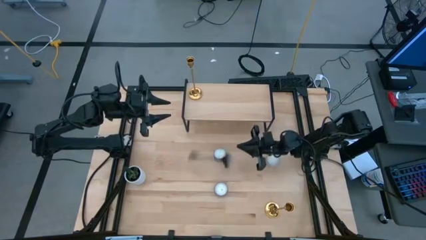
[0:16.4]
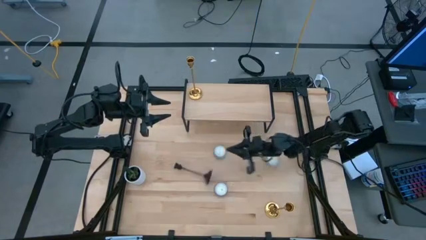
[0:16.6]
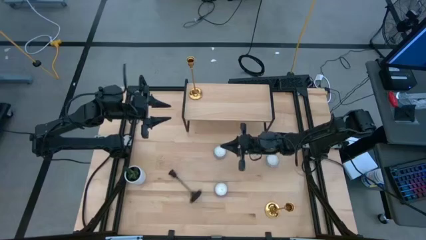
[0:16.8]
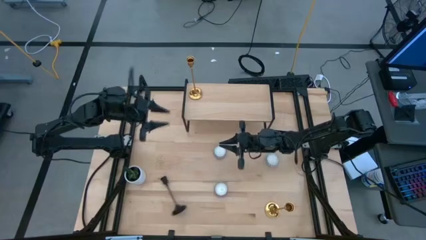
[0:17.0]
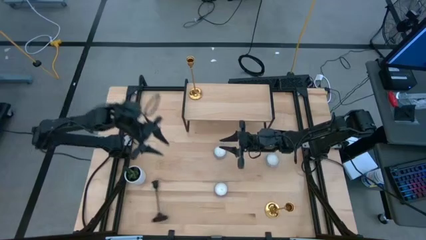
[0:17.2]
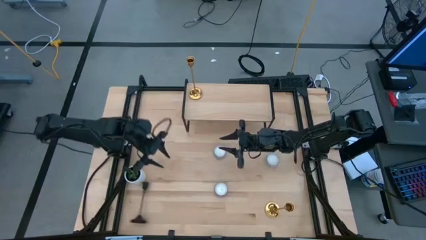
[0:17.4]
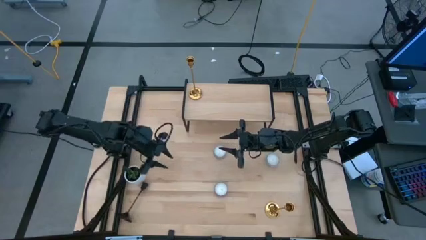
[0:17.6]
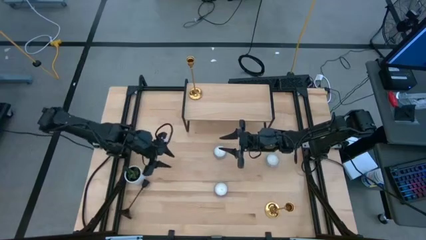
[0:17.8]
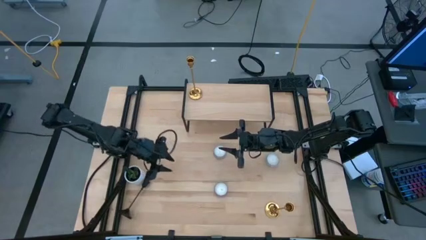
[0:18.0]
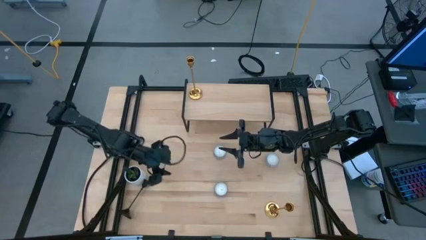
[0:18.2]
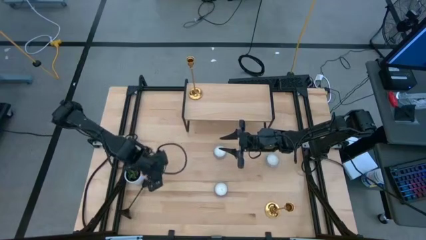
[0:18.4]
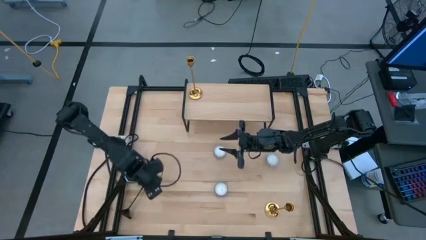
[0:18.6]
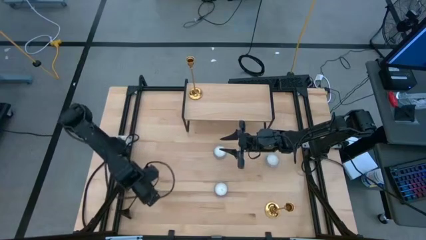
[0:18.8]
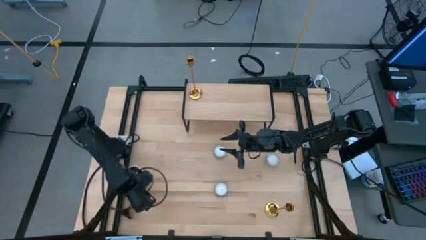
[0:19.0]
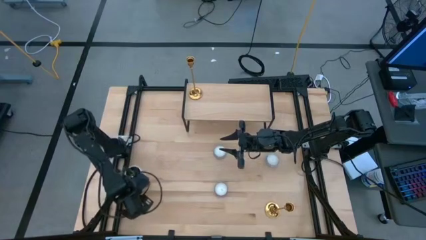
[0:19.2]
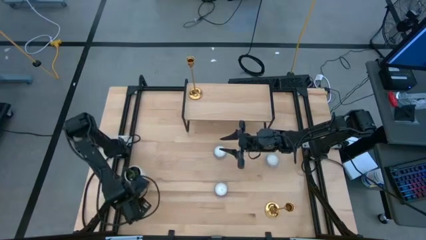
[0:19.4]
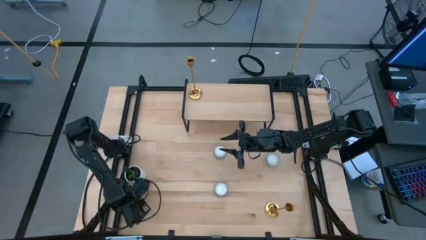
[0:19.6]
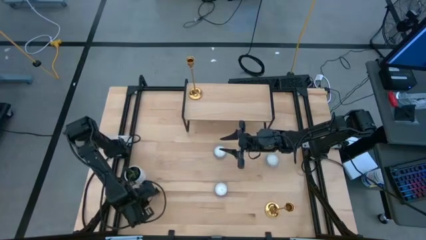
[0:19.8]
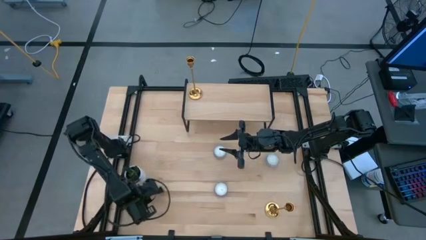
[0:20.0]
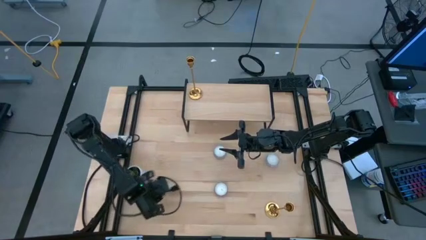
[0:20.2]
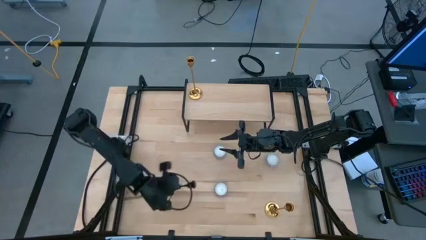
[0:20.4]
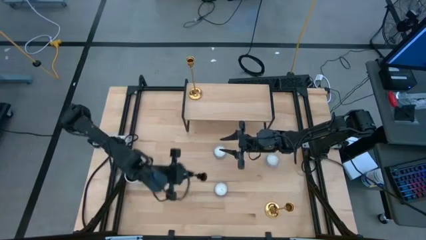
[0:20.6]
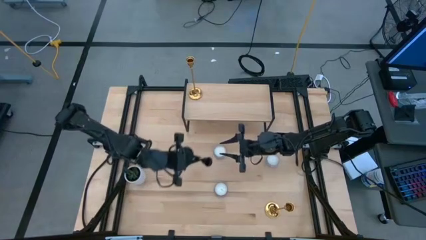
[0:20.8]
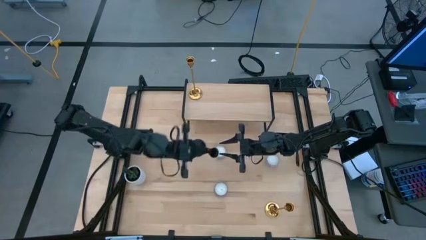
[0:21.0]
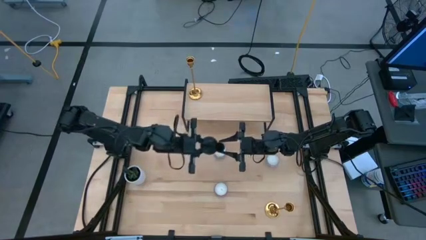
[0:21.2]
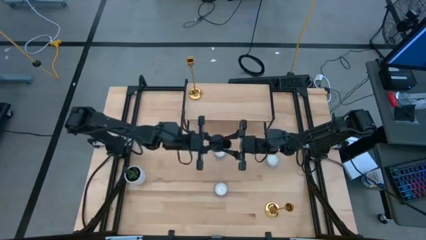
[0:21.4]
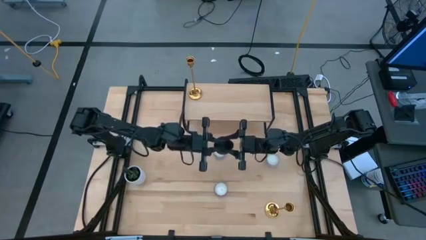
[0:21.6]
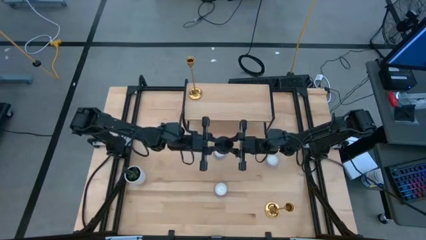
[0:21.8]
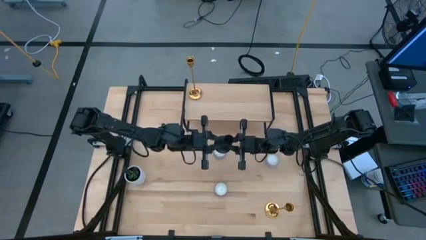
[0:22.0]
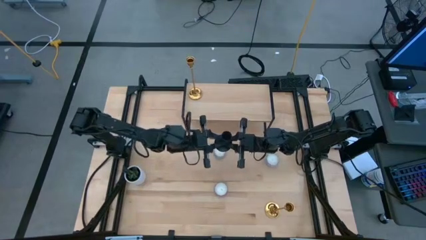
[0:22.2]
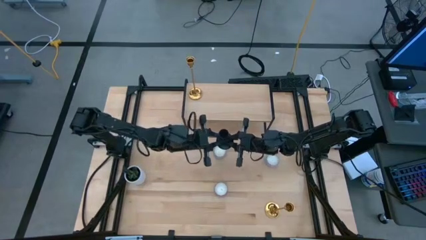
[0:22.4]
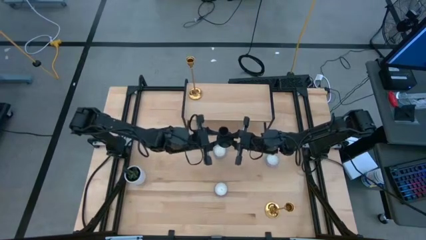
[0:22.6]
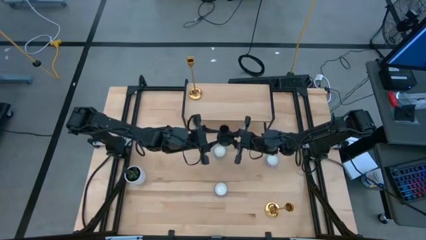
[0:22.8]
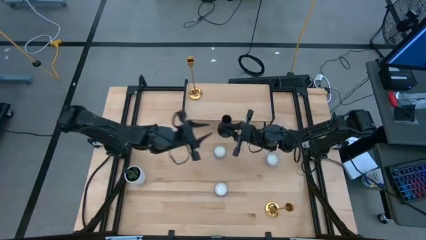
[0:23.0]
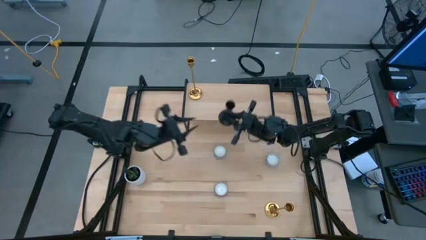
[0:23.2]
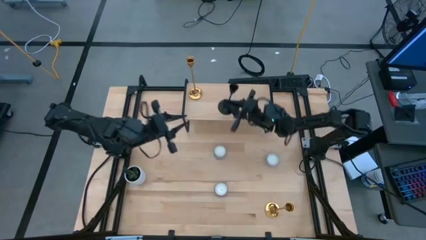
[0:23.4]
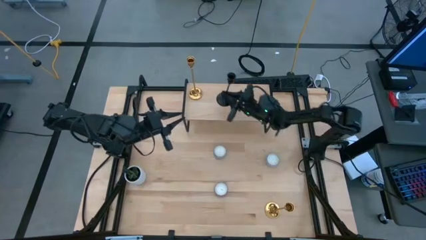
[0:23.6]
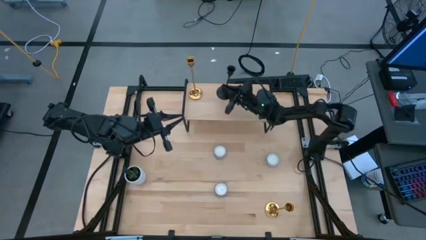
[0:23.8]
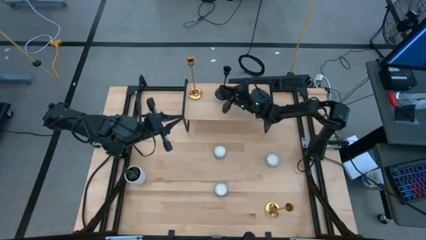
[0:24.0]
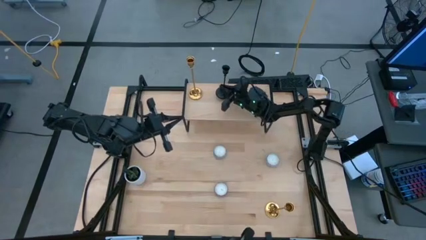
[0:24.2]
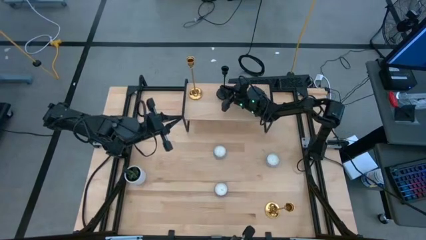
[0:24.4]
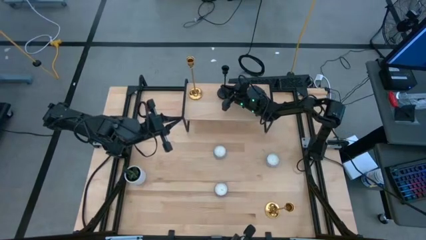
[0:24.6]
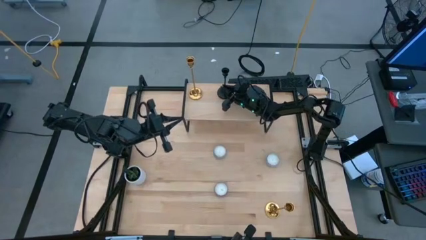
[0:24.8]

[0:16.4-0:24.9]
Task: Pick & Place candle stick holders
Put the black candle holder on the shelf

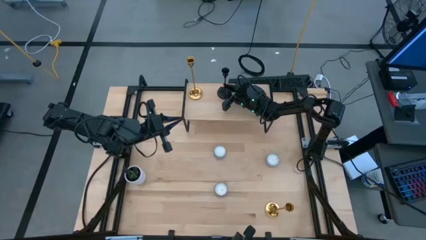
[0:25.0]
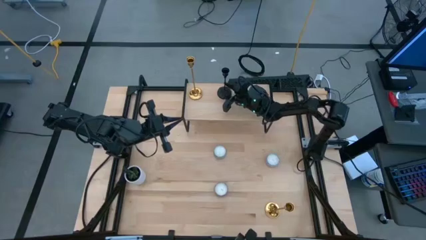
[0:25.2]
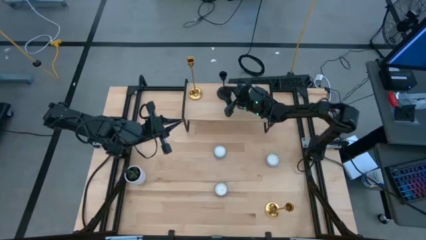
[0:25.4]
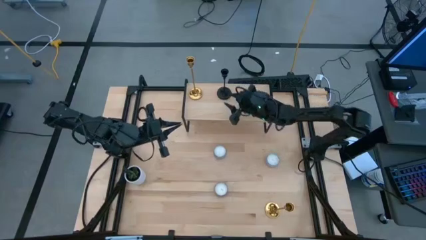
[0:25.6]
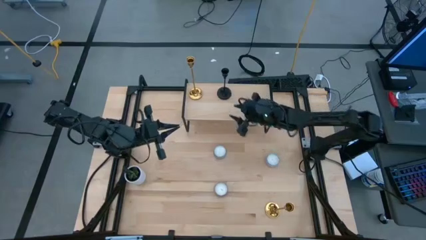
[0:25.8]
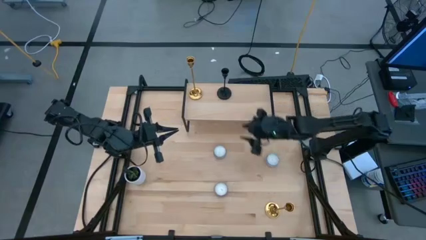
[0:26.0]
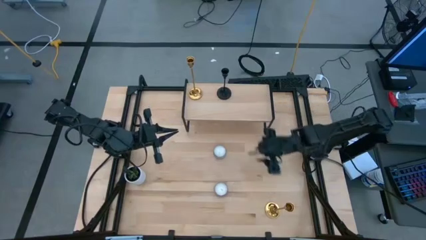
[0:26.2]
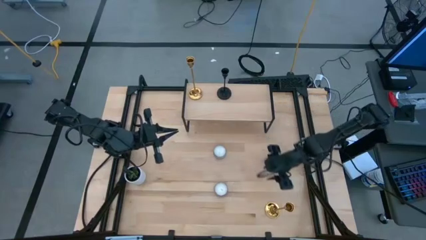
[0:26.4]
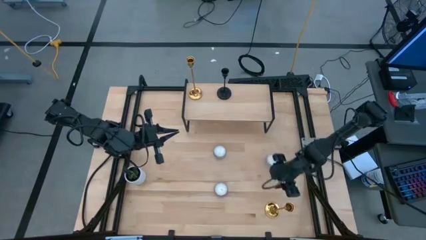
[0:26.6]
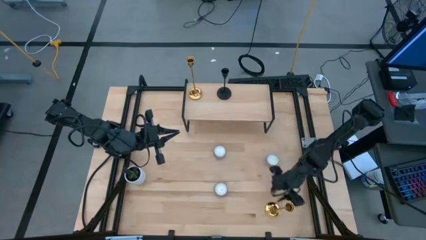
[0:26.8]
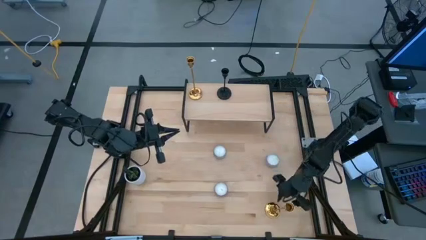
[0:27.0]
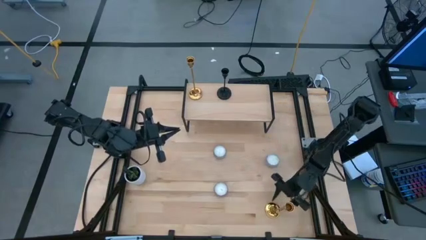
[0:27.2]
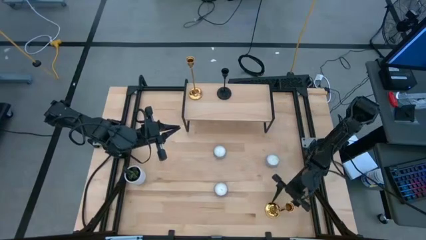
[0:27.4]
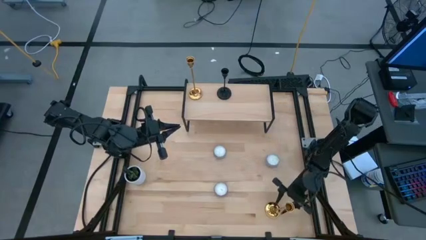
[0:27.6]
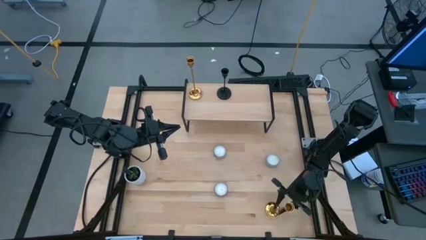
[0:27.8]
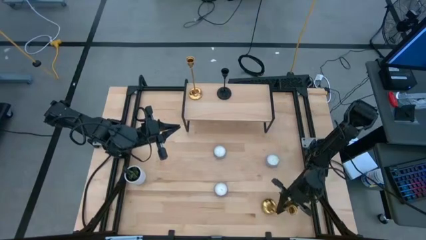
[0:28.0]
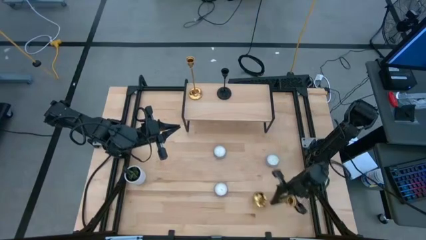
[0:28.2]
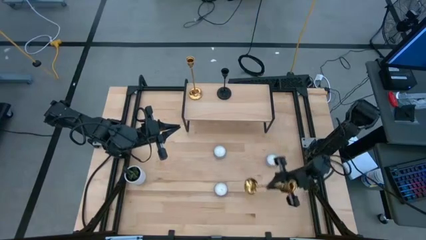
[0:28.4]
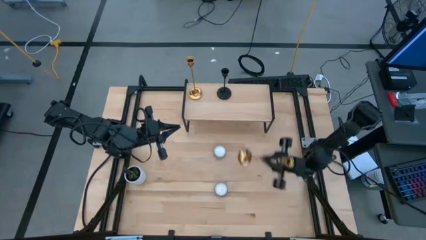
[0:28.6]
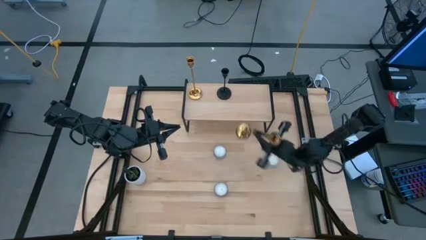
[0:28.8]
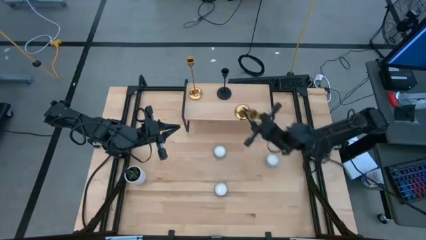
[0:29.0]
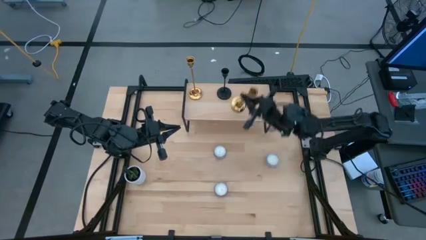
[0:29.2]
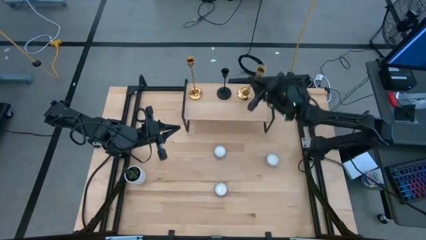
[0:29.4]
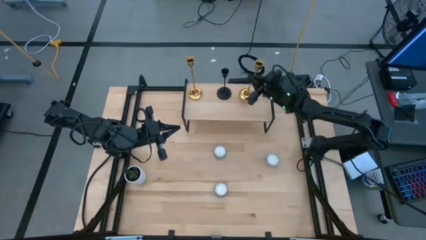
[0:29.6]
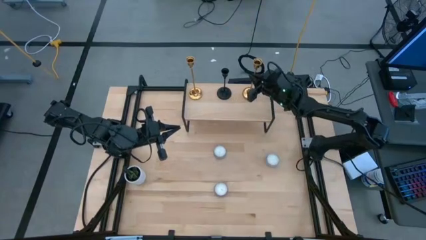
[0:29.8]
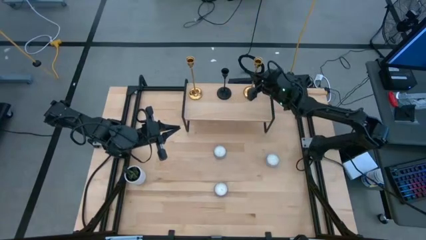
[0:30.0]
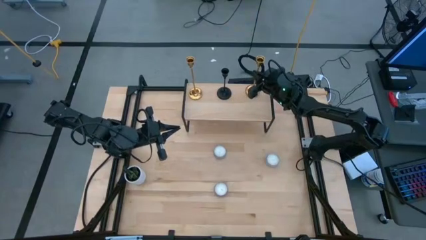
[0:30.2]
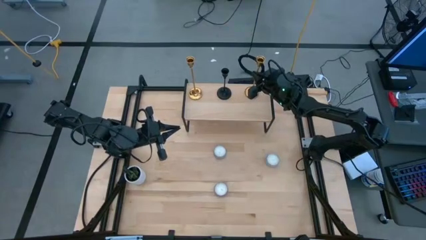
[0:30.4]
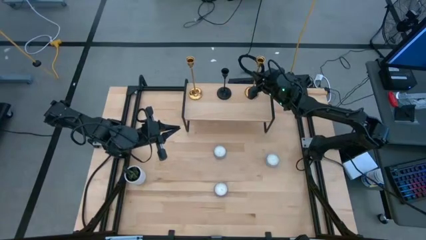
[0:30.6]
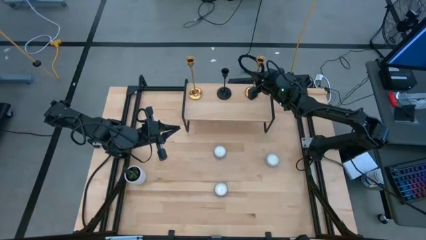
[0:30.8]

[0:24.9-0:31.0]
Put the golden candle holder on the shelf

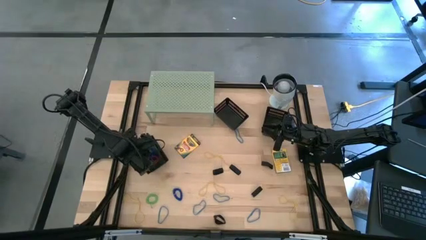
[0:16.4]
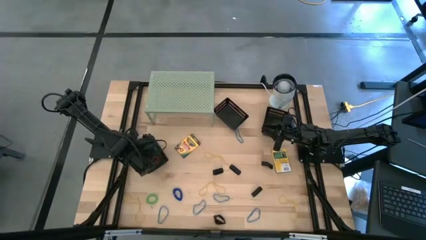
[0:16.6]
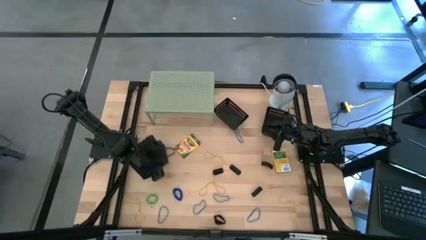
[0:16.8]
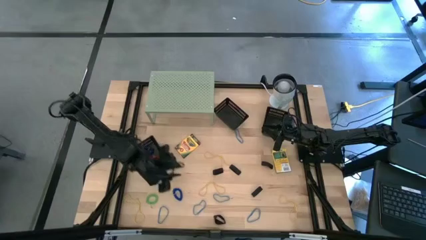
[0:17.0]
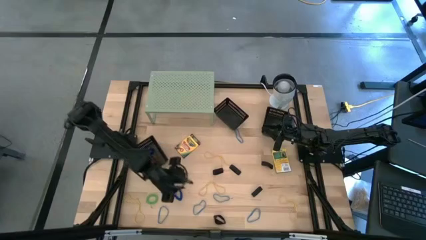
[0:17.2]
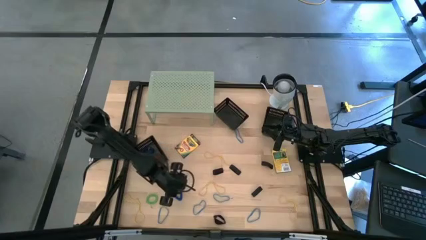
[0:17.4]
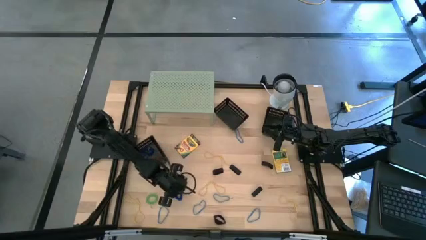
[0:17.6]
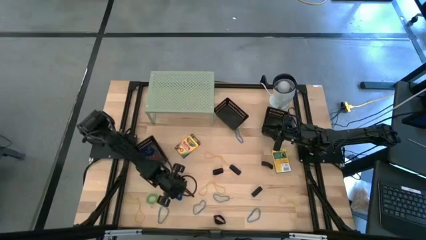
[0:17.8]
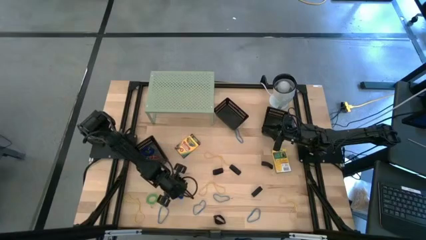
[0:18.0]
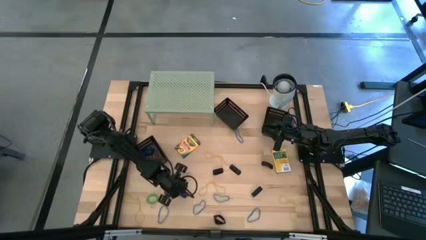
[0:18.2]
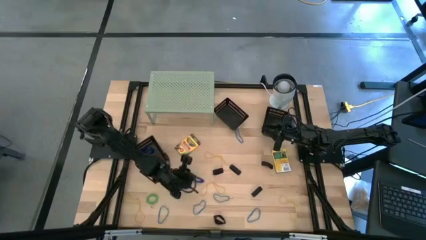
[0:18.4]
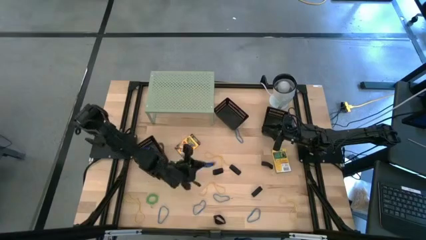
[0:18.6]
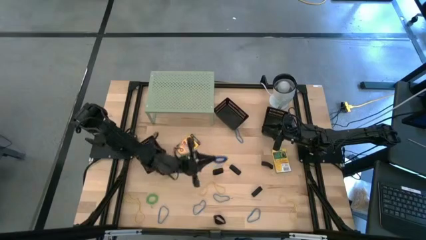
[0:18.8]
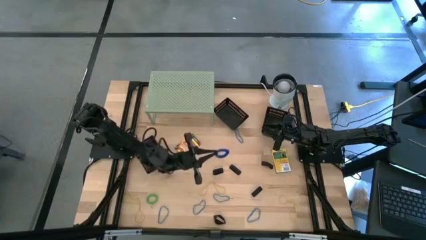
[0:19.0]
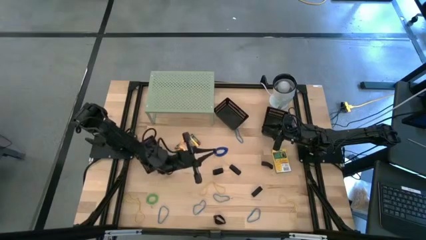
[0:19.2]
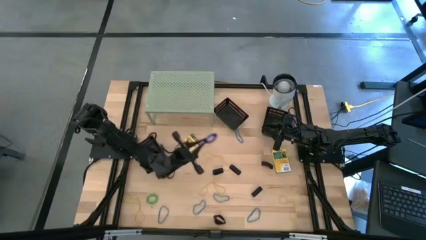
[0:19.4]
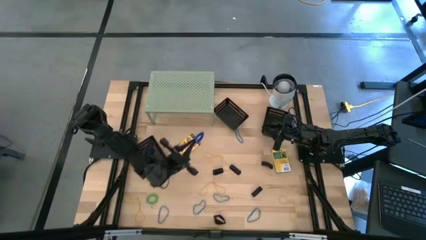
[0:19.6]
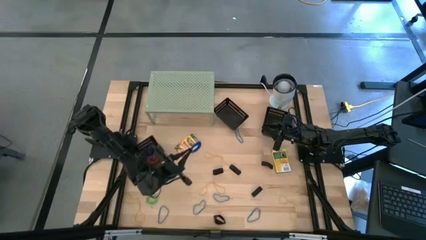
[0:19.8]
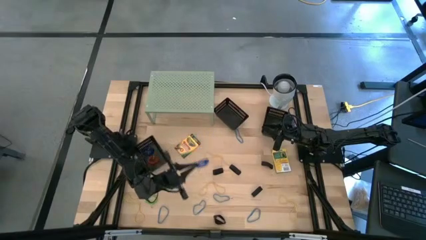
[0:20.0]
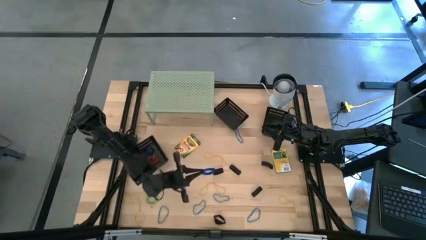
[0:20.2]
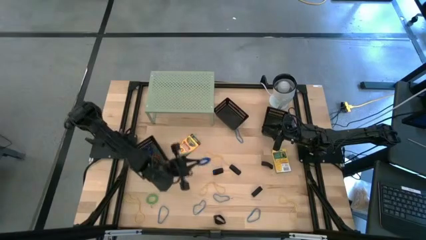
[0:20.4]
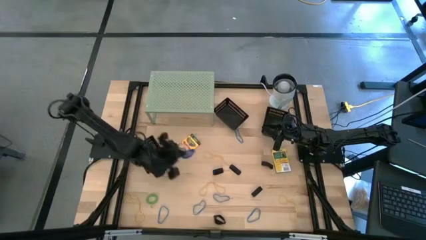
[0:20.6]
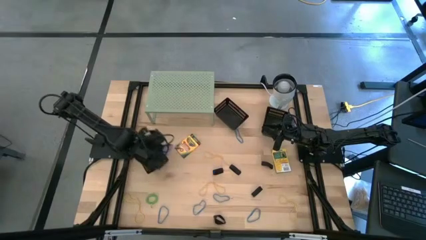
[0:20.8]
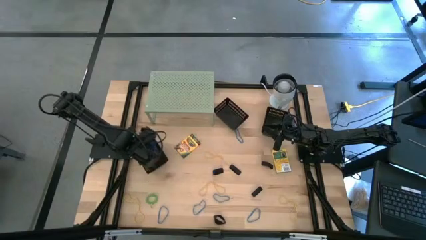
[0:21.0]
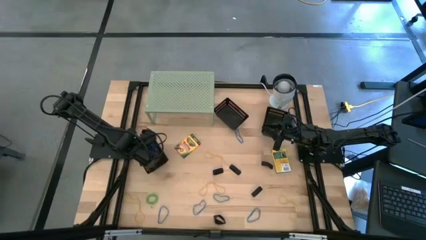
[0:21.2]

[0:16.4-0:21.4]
Task: Pick & Place Office Desk Supplies
Put the blue keychain into the bottom black bin
